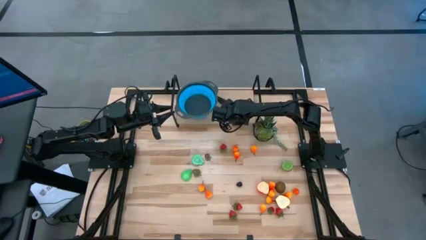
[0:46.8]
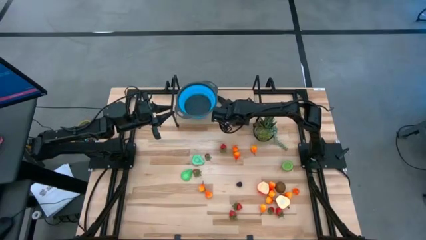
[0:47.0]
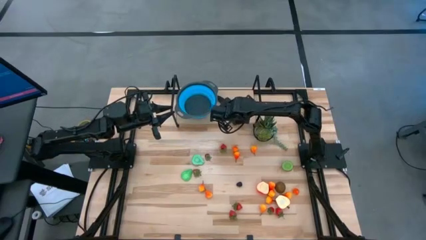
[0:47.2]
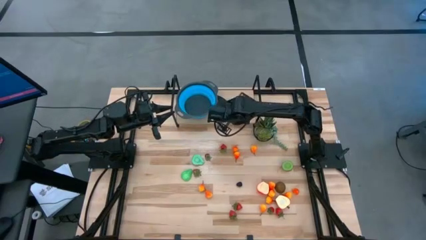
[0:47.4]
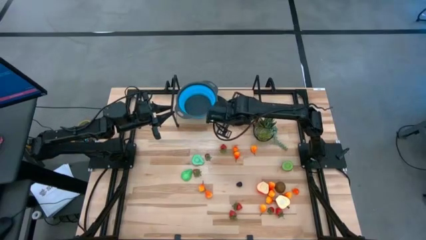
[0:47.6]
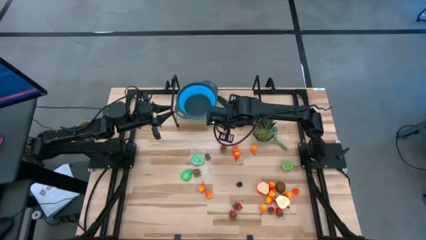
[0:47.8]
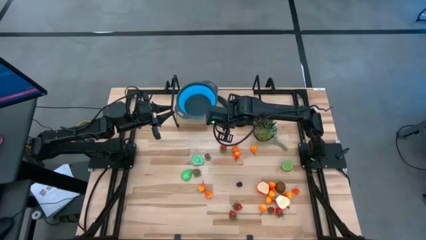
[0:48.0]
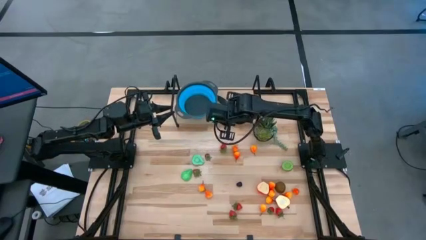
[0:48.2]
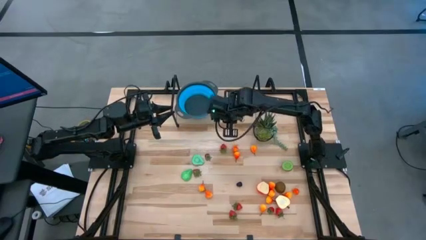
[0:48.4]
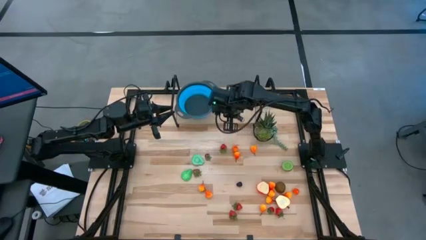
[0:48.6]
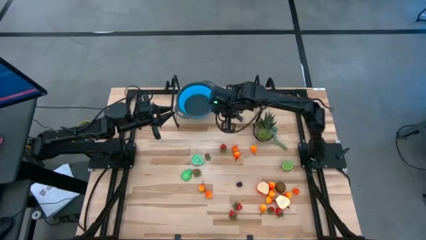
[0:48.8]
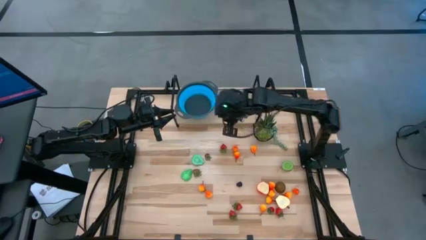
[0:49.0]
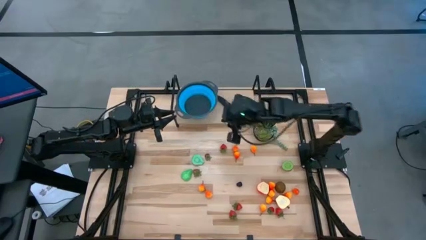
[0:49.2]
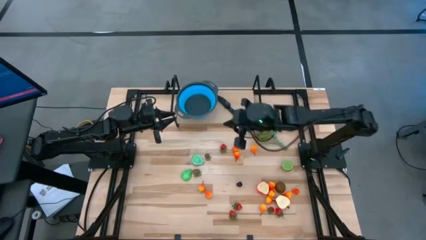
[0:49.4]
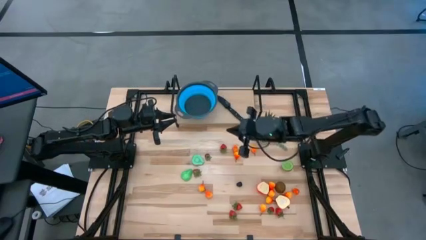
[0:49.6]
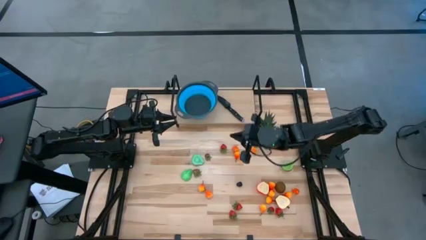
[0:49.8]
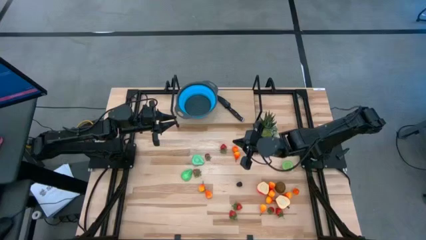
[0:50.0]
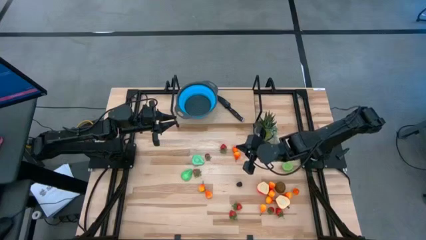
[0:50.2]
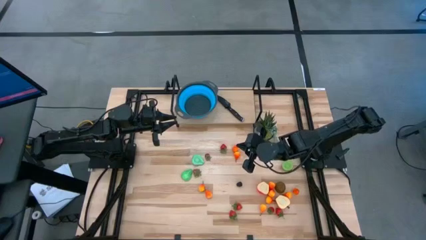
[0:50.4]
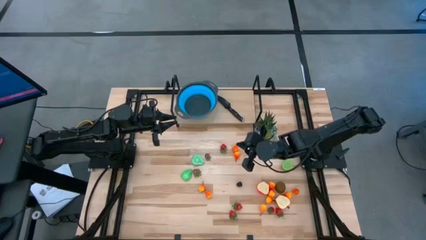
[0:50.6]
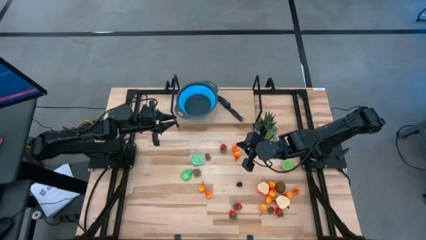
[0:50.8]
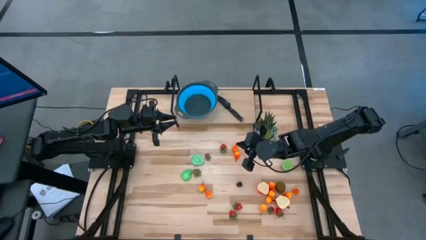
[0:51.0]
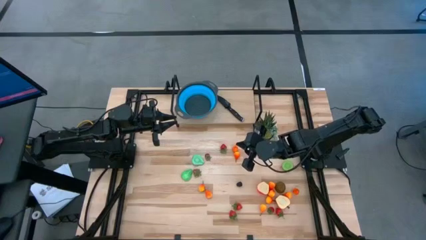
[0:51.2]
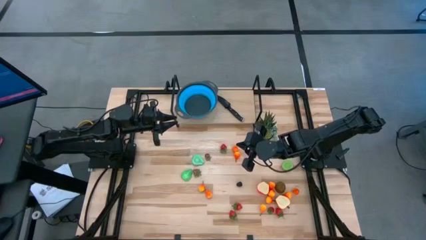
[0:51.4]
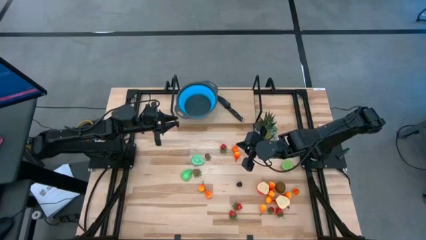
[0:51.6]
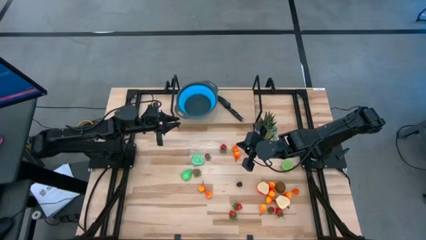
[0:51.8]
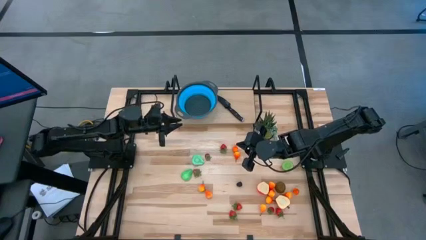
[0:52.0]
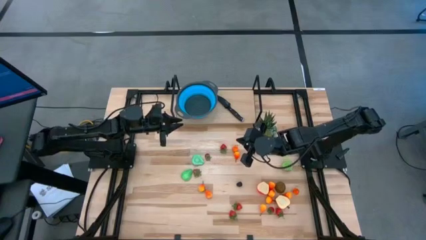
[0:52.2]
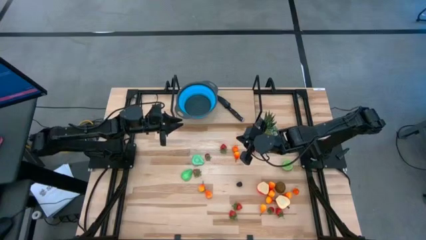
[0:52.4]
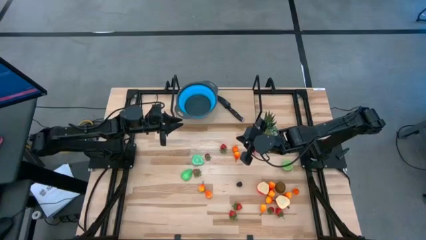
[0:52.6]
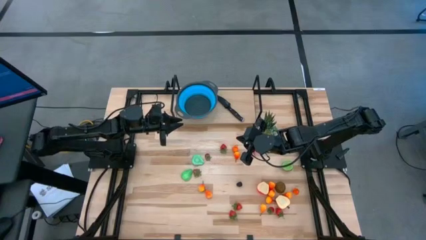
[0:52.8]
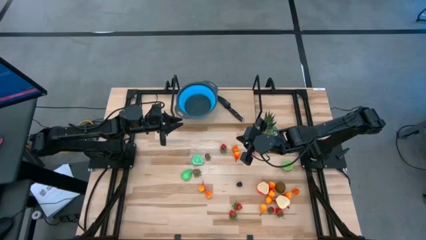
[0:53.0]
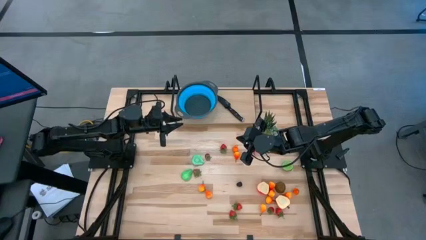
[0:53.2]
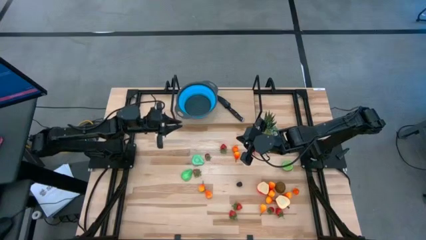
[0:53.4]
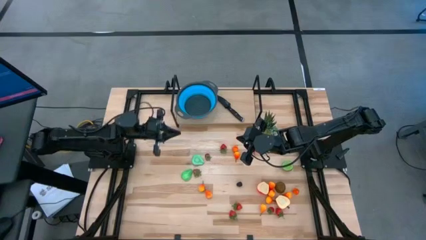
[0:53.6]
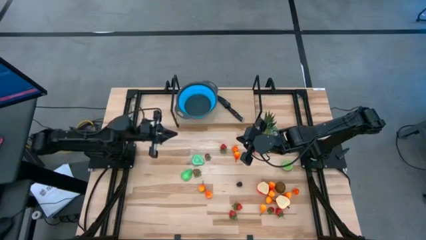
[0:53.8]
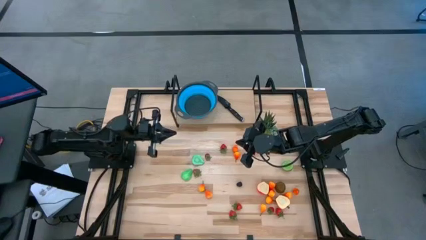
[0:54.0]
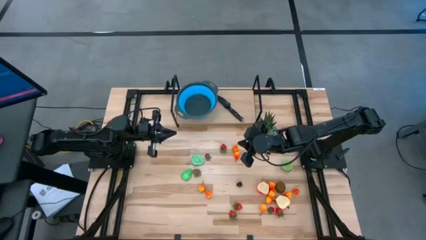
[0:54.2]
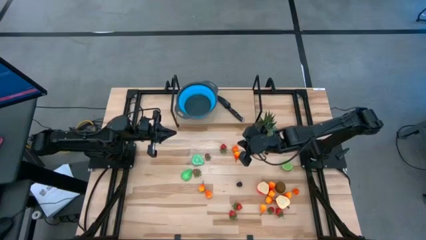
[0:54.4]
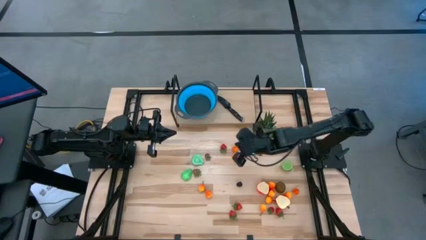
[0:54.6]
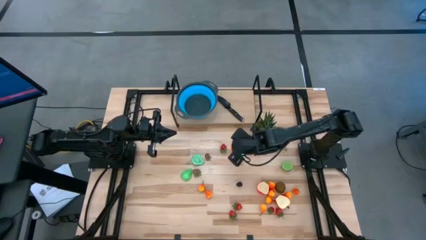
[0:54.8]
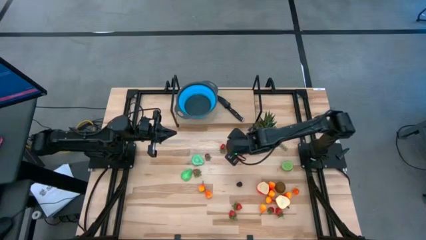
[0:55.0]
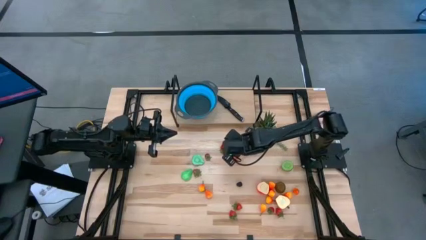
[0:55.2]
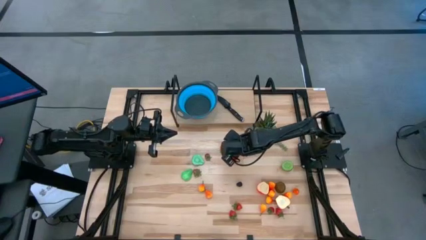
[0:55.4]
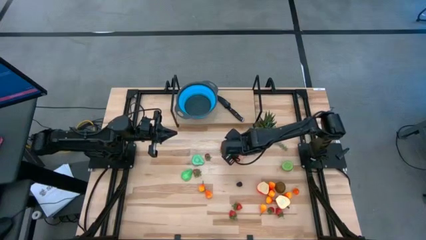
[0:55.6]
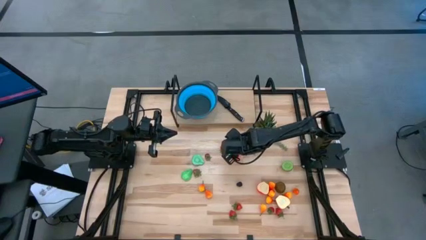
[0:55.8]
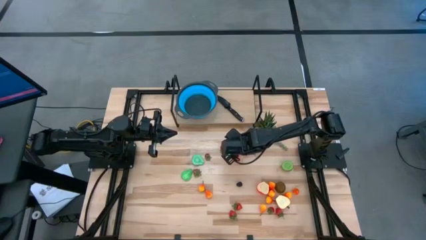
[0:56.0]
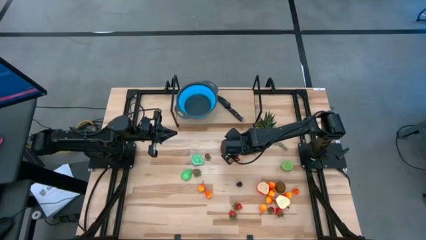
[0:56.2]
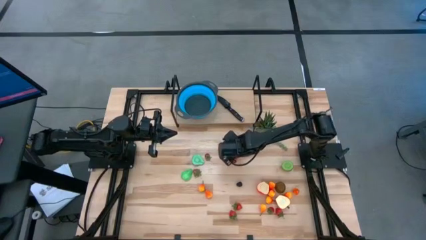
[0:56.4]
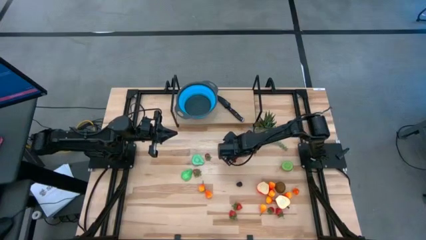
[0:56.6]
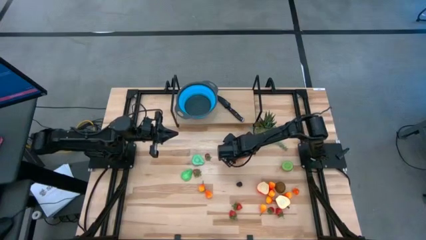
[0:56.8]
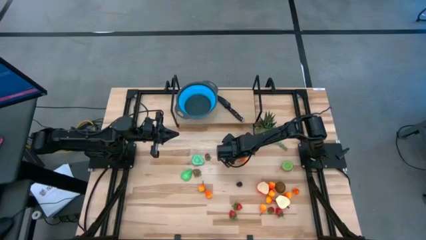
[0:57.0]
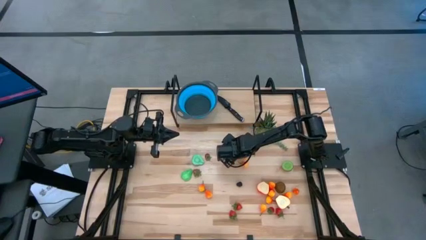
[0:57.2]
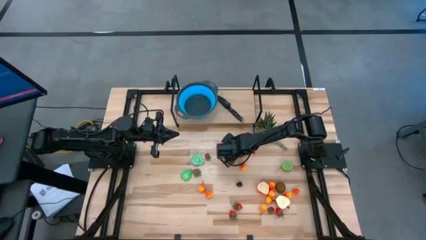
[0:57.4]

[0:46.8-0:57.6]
Task: Pick & Place Fruit
Put the pear into the basket

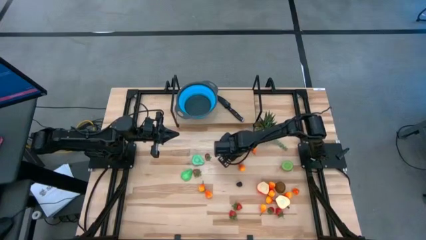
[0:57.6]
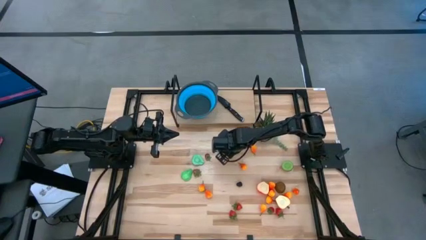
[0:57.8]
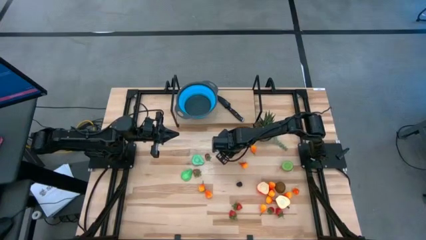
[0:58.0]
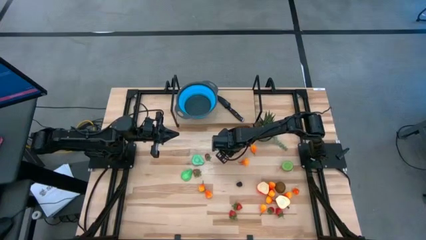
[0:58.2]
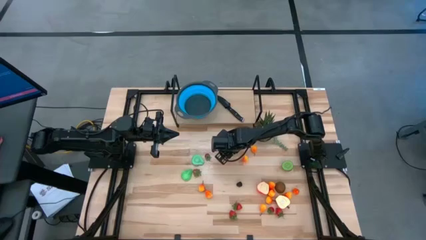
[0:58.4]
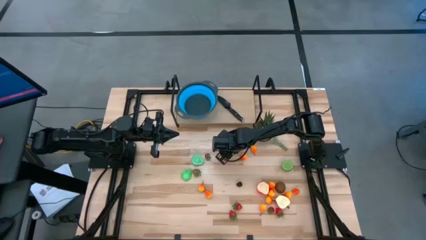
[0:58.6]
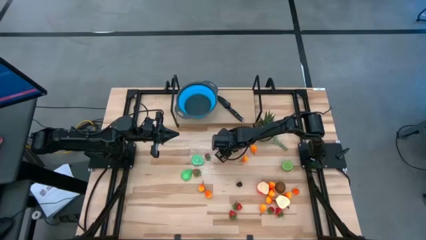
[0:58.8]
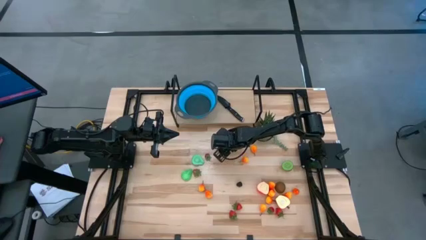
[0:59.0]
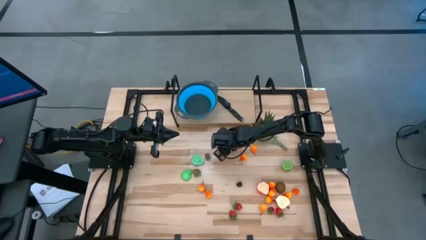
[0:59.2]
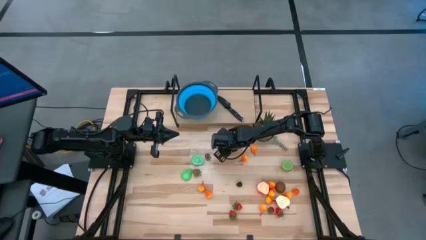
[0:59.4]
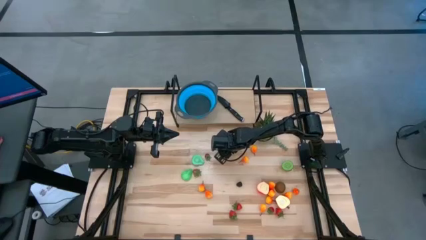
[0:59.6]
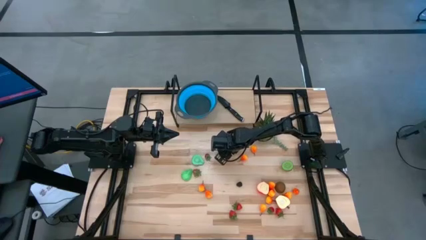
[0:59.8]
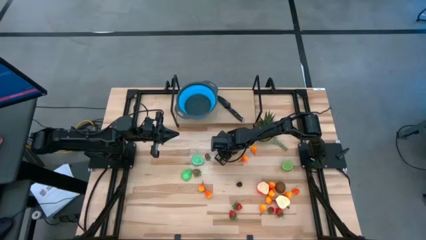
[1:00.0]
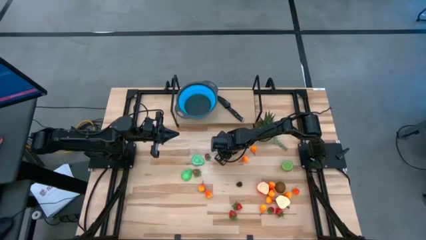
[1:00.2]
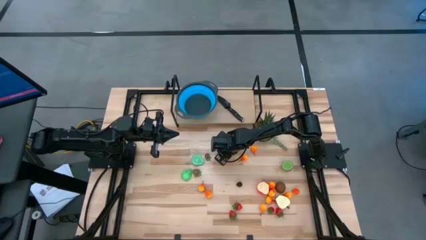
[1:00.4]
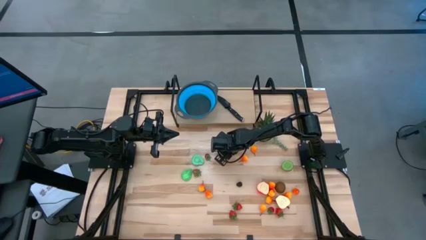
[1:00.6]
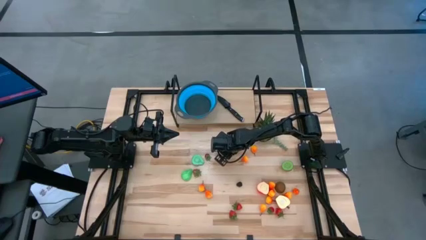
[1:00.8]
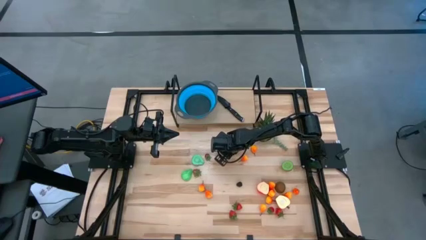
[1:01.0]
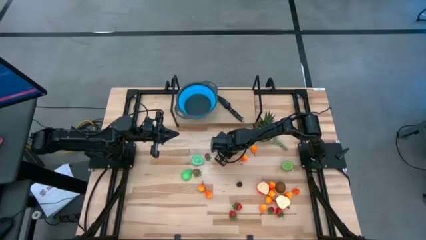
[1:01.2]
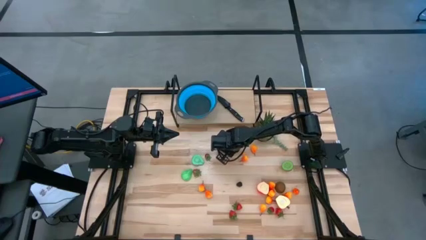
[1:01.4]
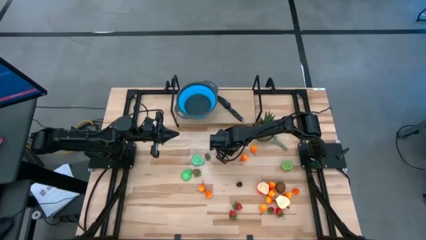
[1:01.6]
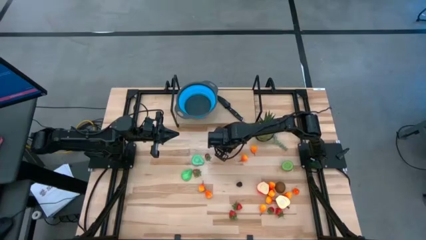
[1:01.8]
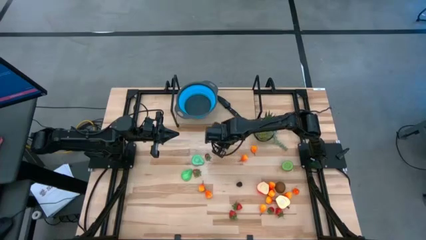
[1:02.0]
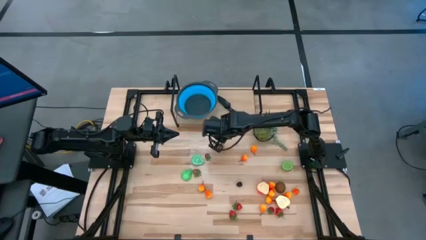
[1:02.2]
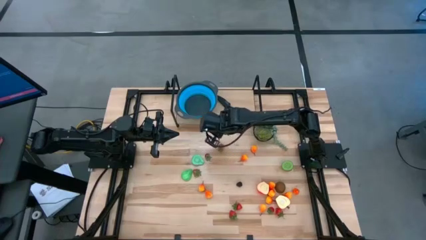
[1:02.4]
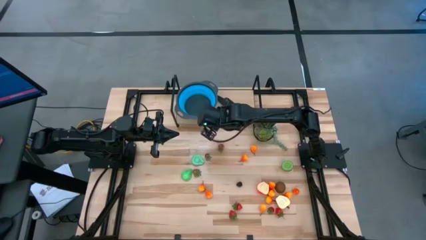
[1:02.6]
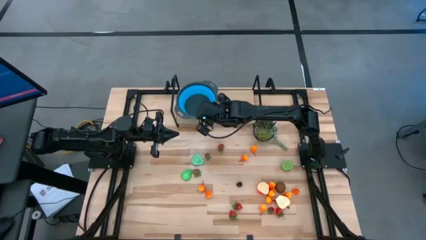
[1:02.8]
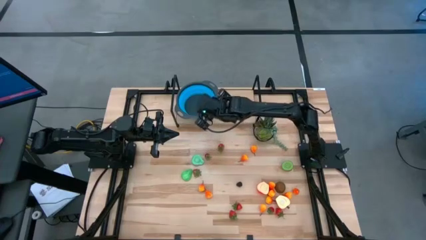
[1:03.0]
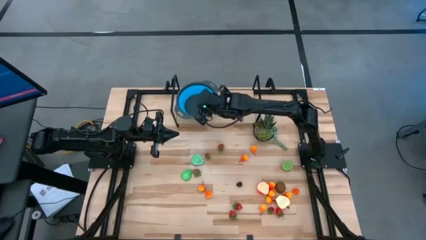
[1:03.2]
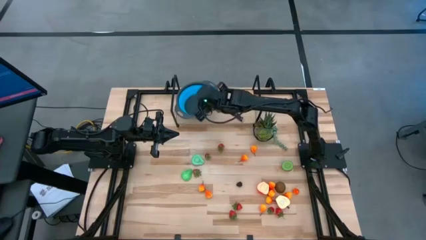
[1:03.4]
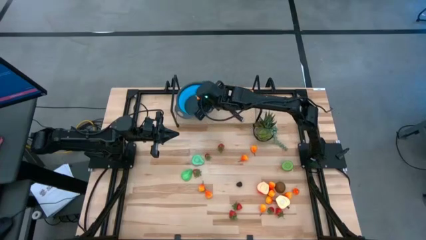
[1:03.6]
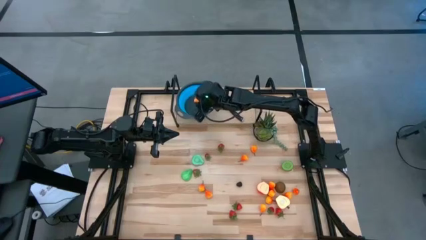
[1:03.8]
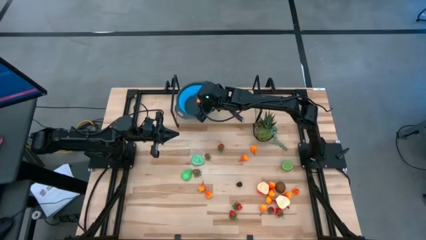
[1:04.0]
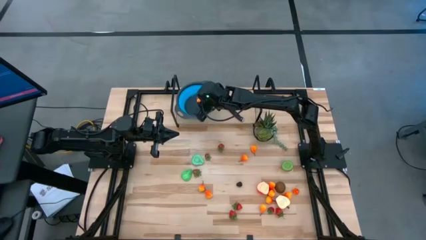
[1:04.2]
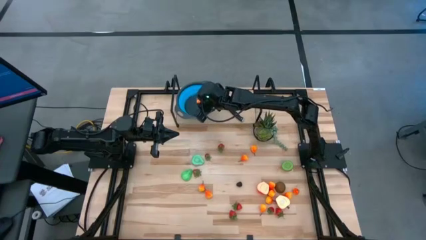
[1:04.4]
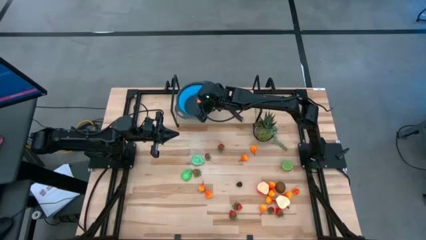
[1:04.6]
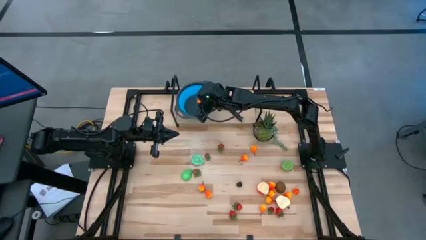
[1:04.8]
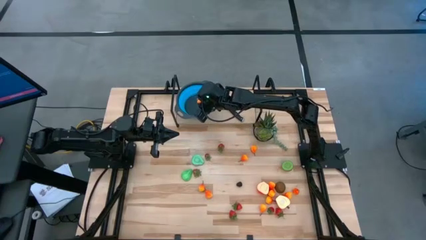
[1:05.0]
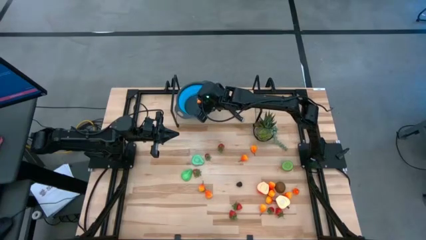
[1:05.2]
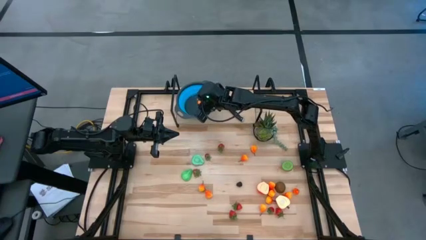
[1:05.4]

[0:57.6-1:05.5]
Put the pear into the basket
